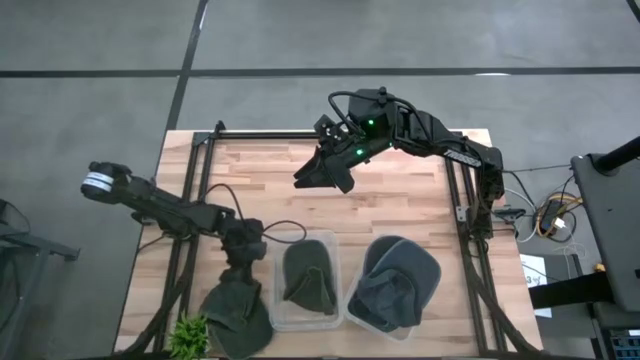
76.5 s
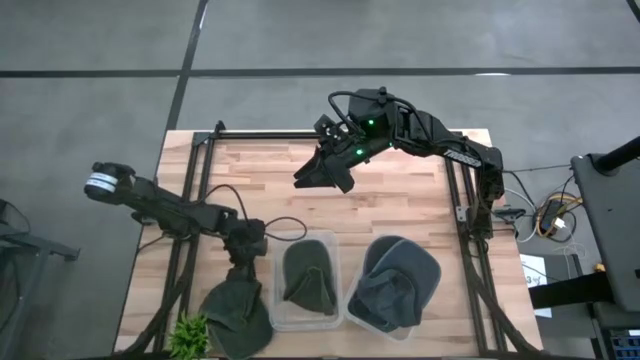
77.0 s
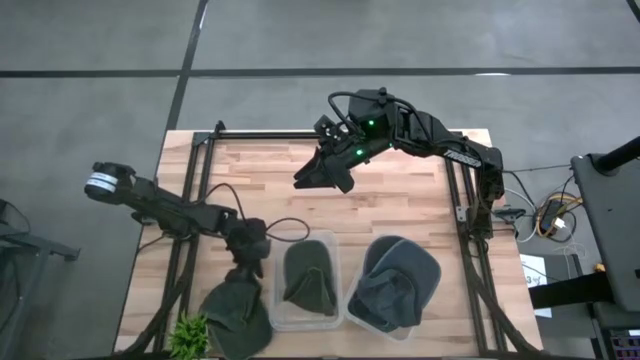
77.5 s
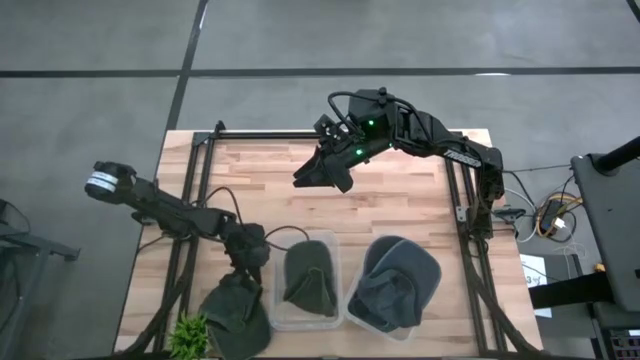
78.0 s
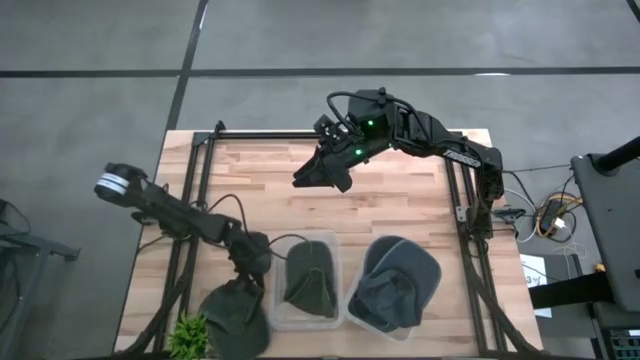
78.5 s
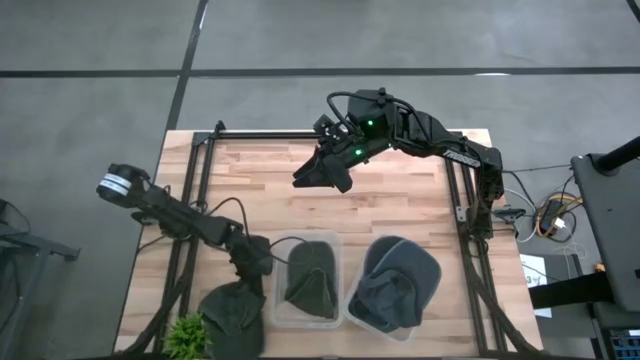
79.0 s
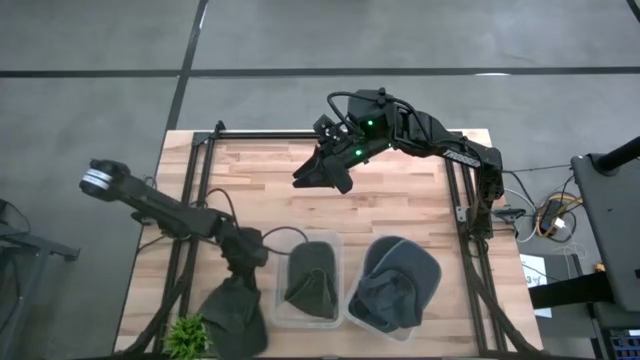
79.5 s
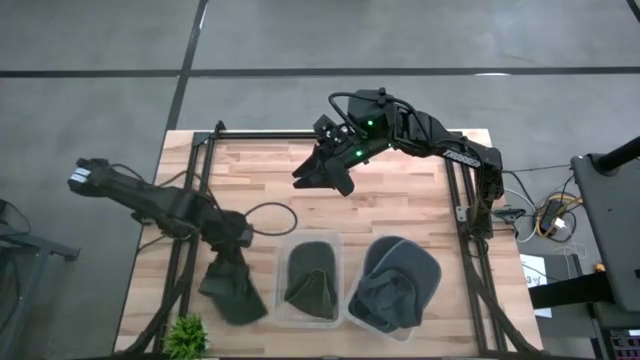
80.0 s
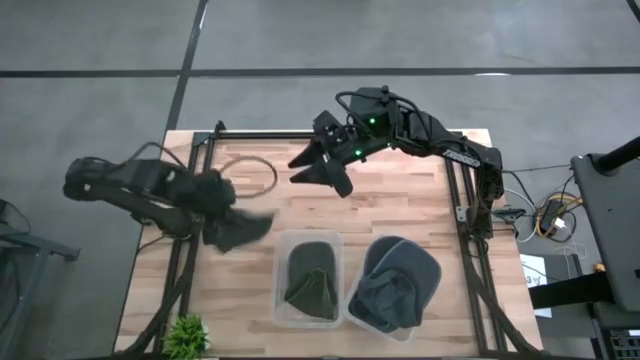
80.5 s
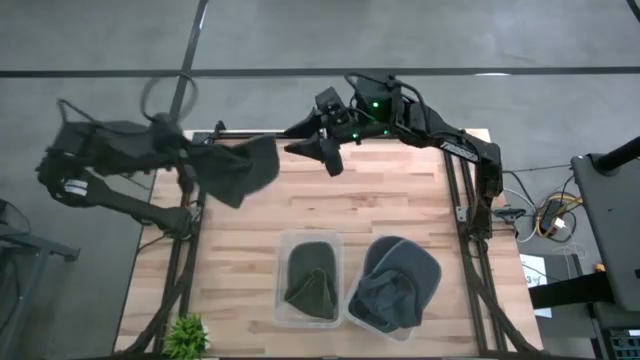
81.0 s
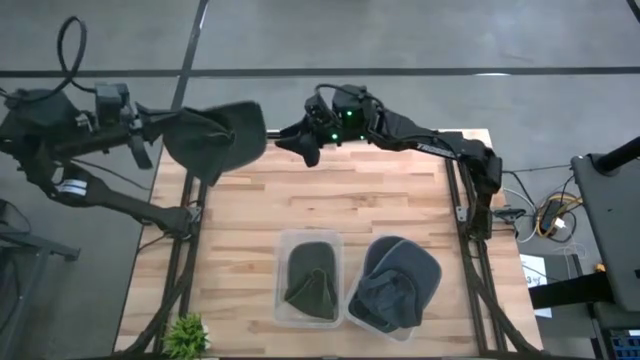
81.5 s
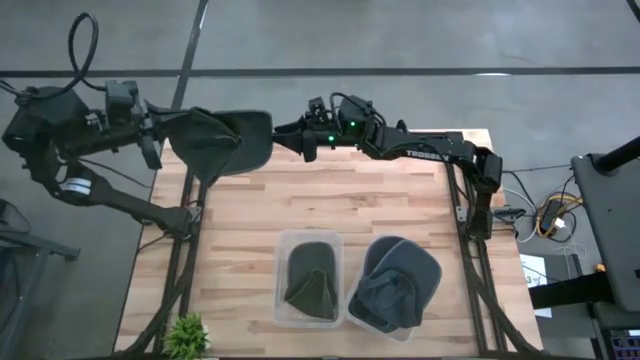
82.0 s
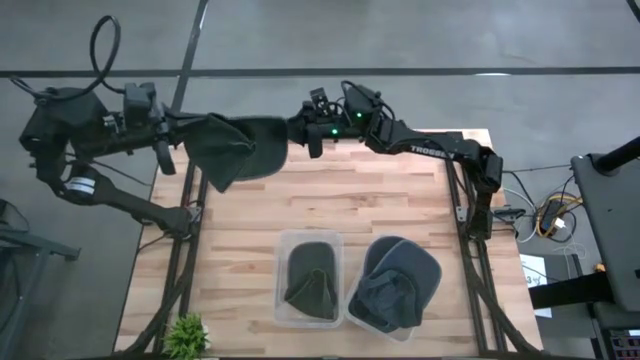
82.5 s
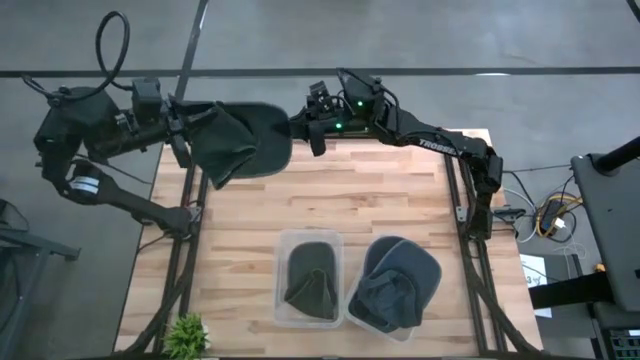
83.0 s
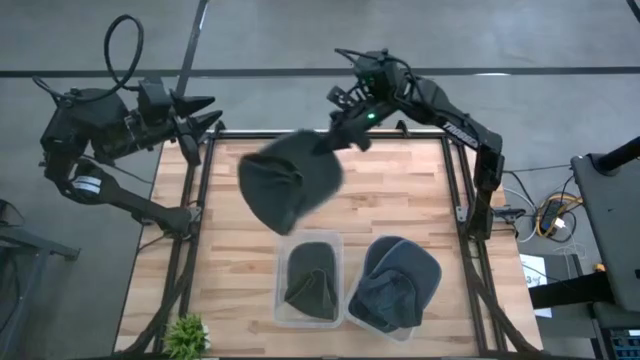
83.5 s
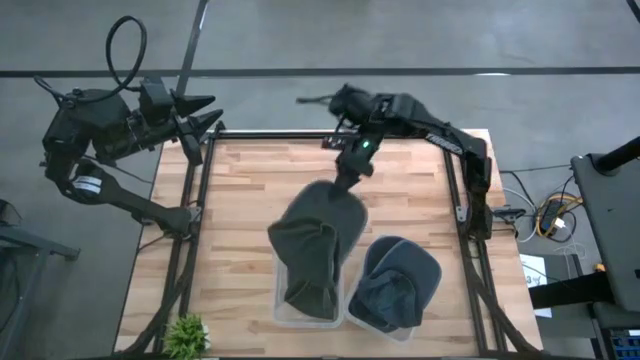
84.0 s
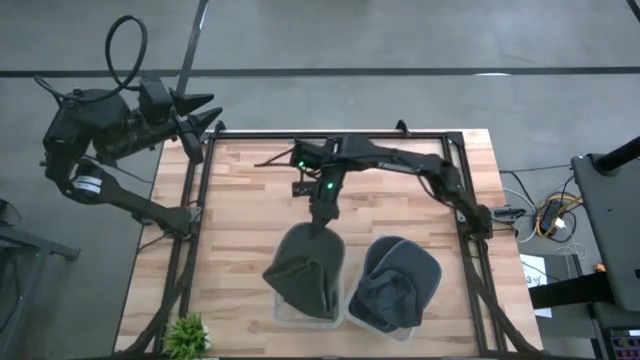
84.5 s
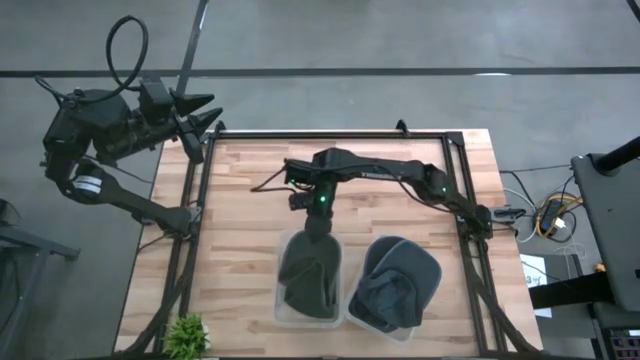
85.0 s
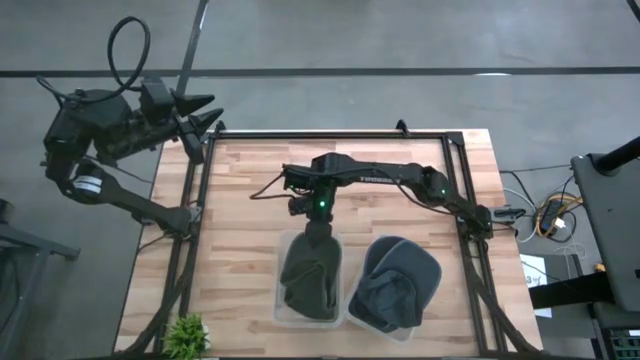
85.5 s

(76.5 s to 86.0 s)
Task: Pick & Place hat
Put the black cap into the left transparent bin

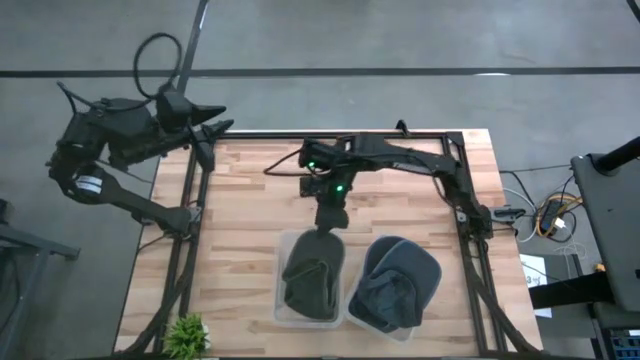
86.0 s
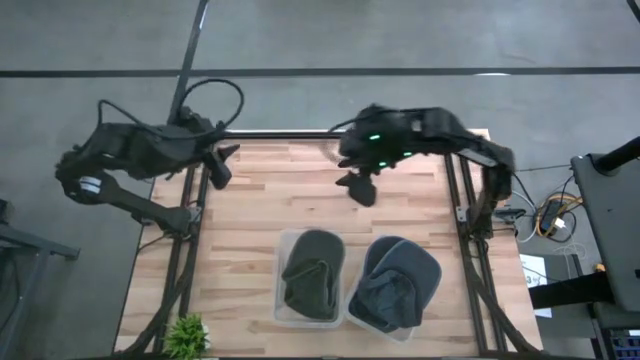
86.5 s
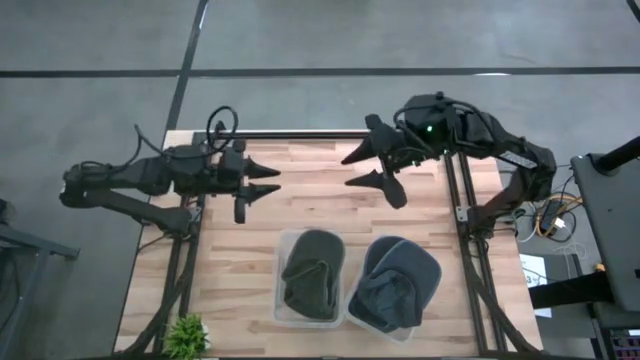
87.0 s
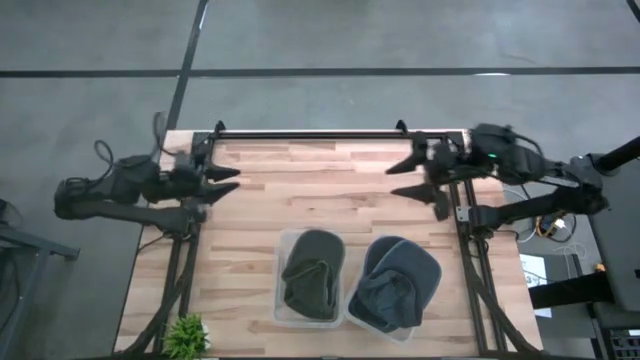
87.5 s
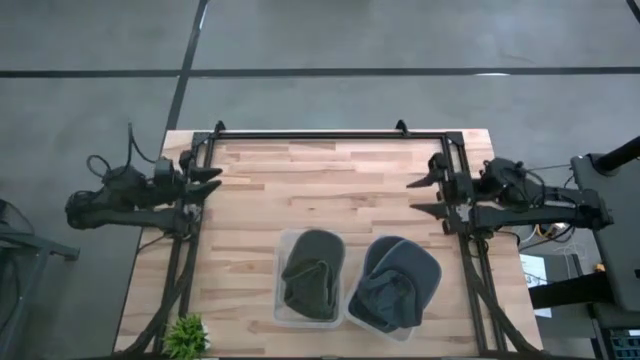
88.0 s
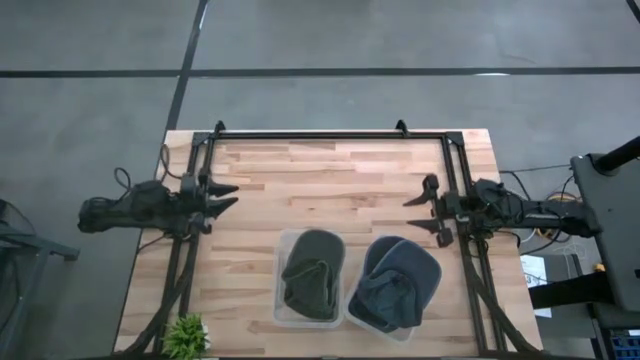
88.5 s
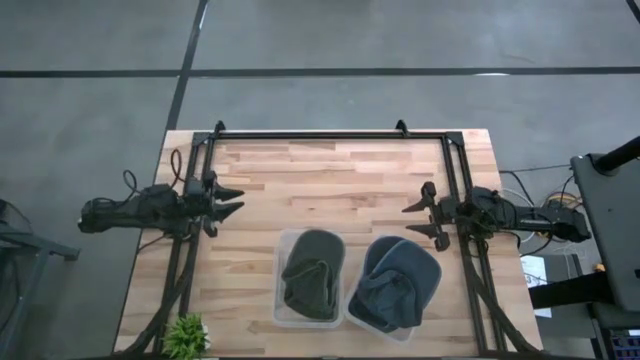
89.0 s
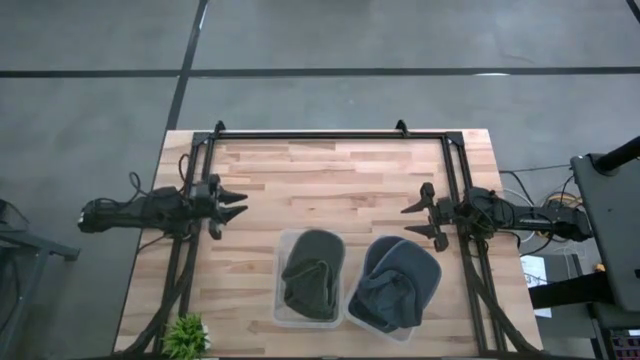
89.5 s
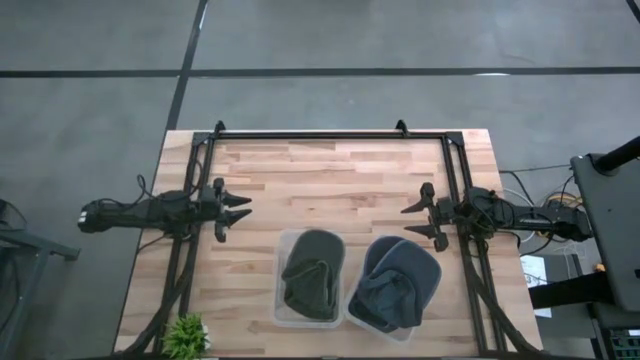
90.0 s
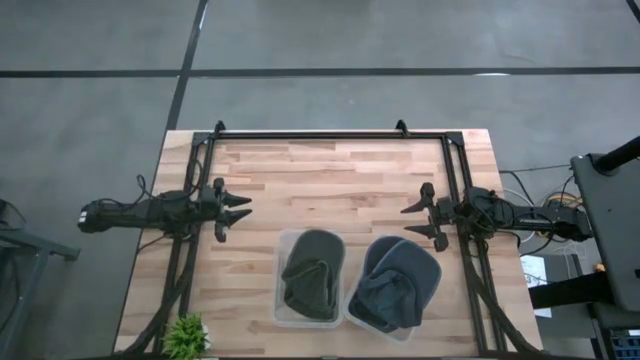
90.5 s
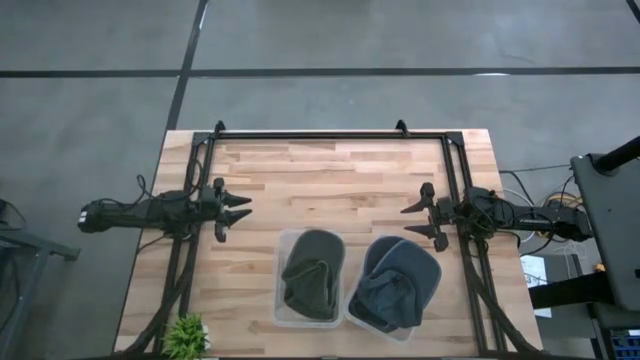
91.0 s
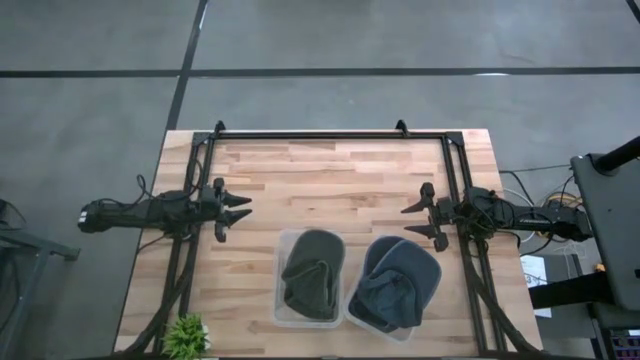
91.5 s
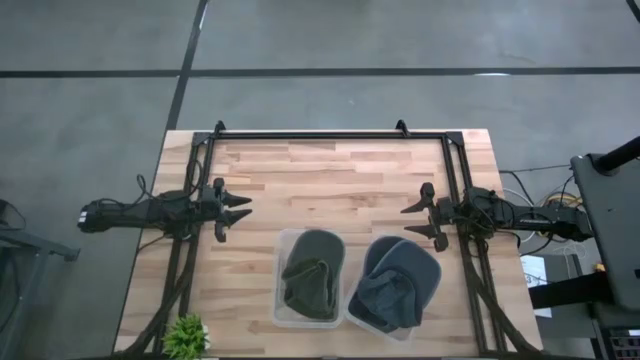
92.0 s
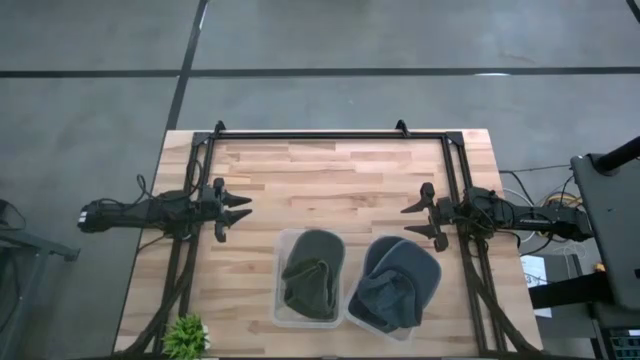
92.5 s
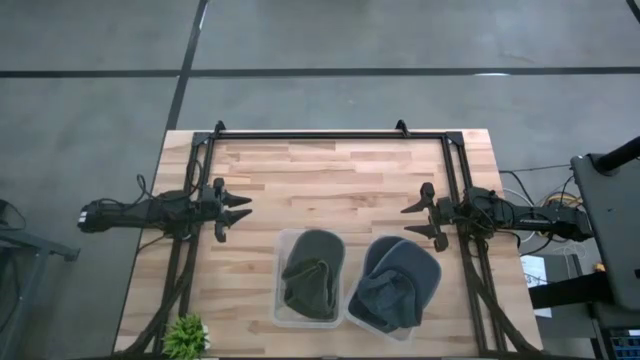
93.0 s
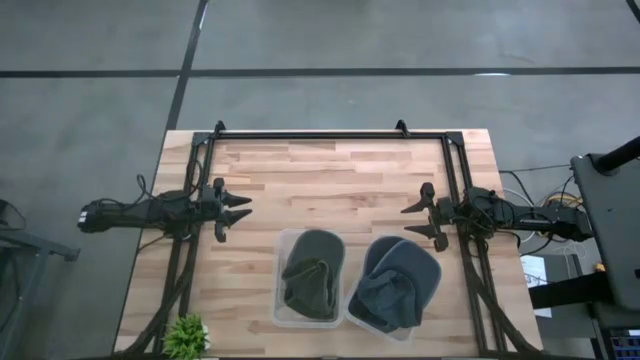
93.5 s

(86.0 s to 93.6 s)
Return to Home Position

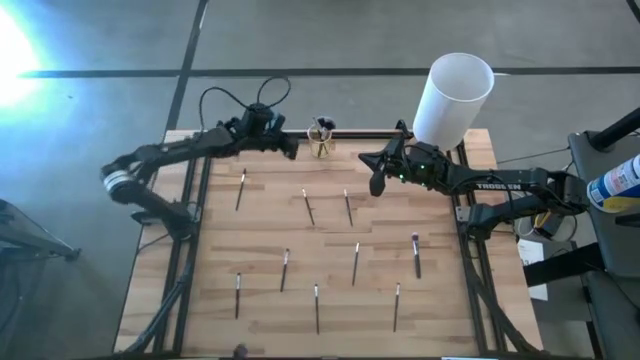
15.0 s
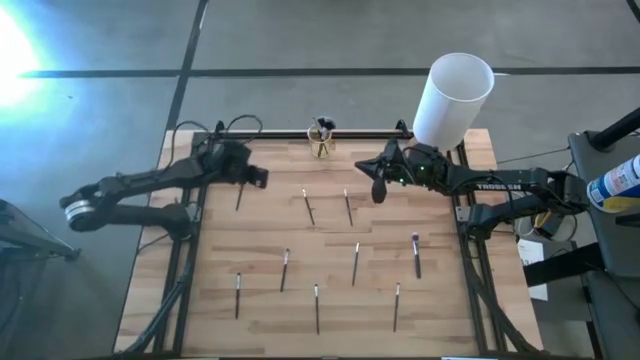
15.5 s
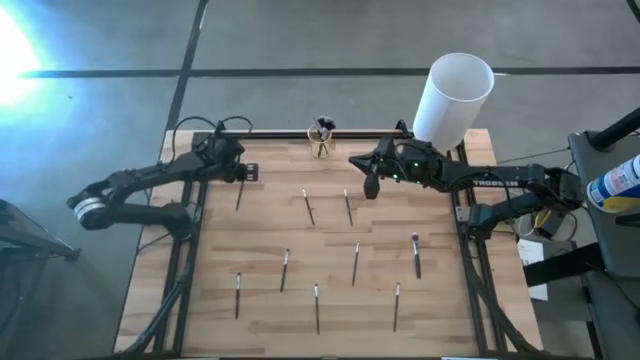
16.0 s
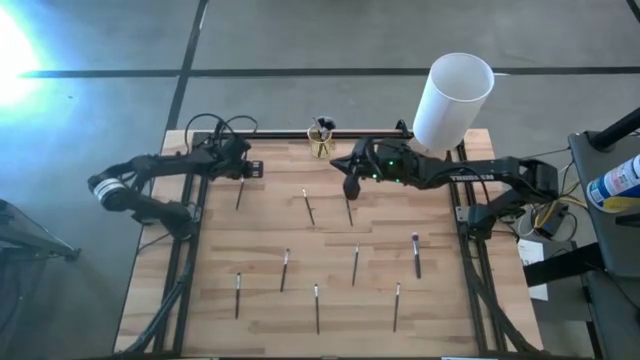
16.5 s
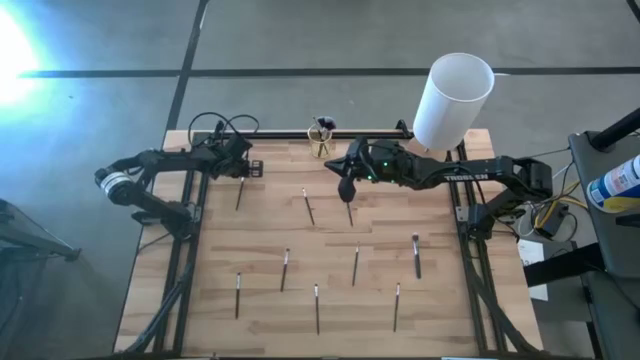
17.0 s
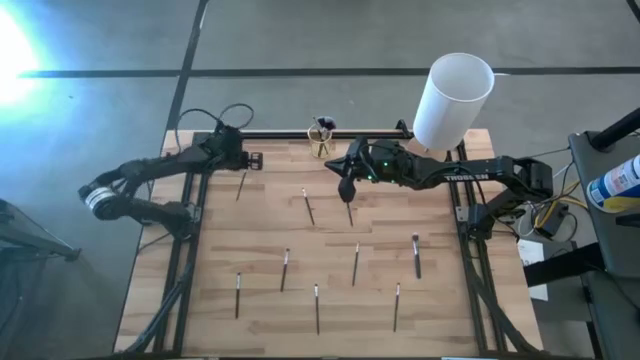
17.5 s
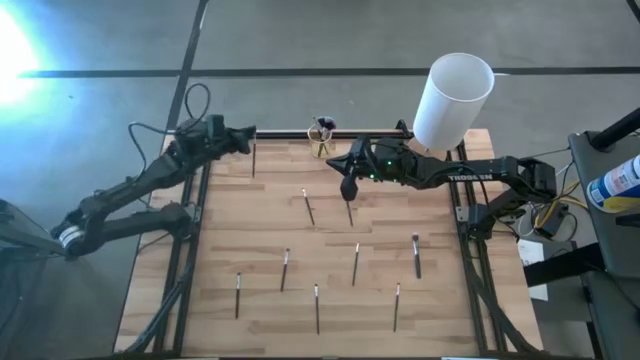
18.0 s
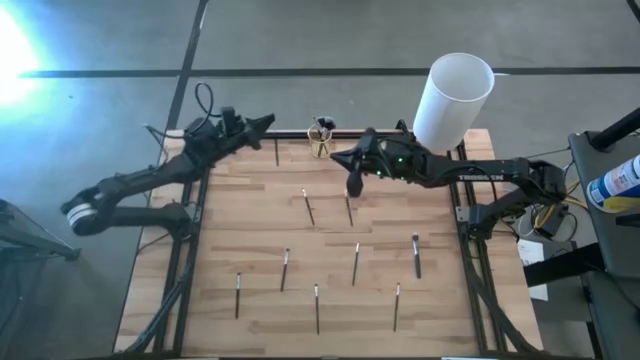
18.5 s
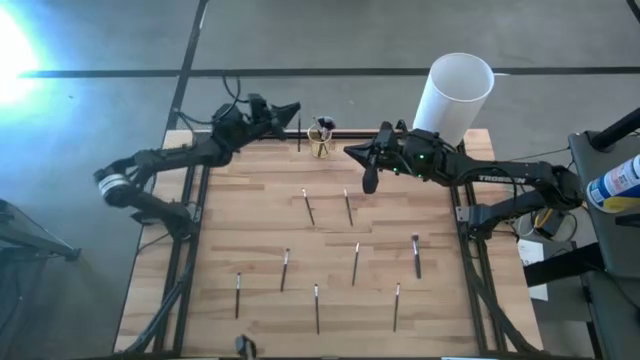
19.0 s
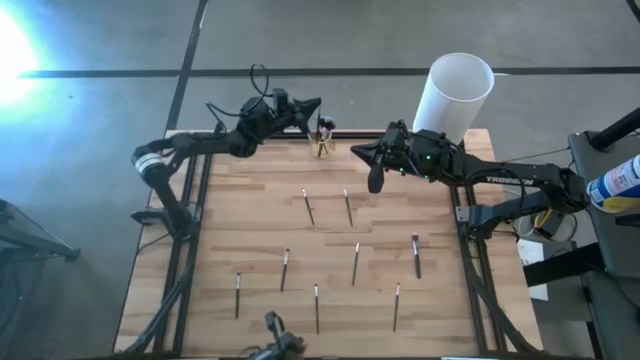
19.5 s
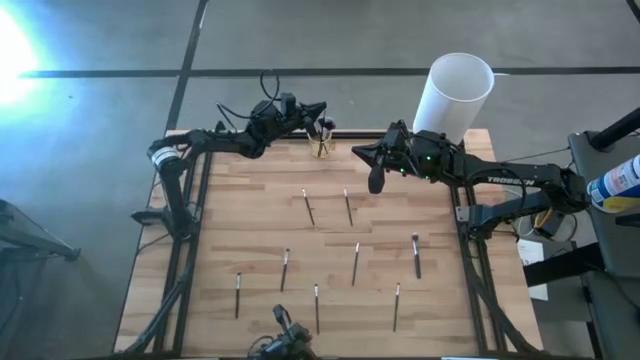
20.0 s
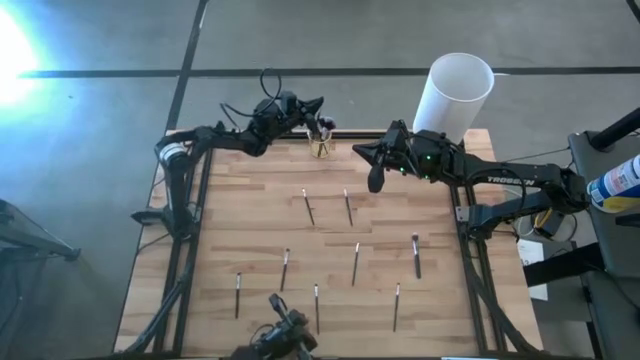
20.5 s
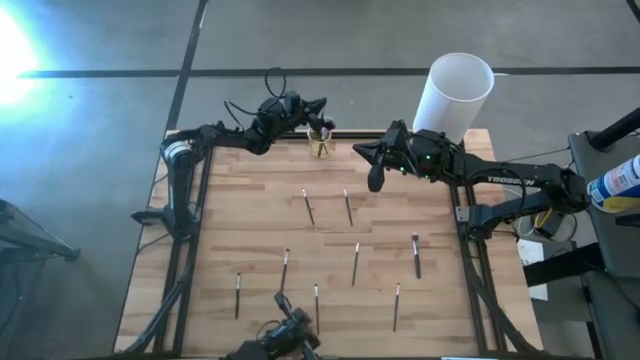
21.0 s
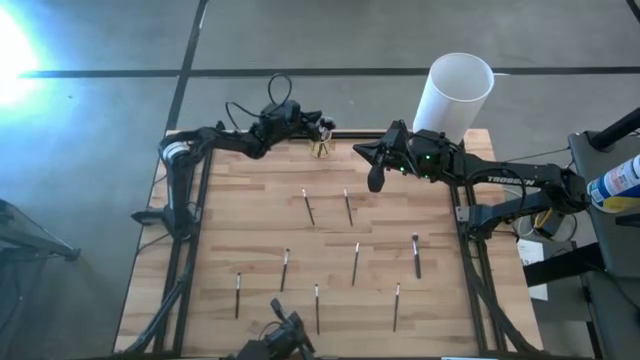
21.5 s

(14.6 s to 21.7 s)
Task: Put items in baskets/containers
Put the black lash brush into the yellow pen holder
